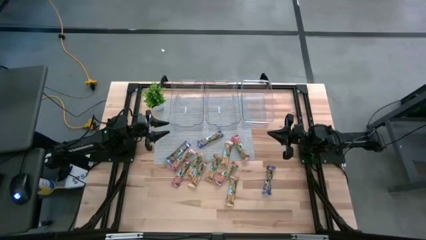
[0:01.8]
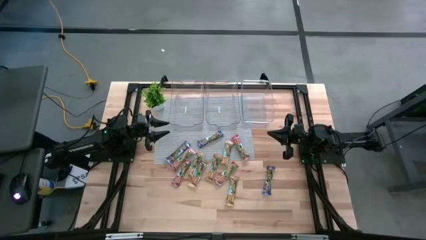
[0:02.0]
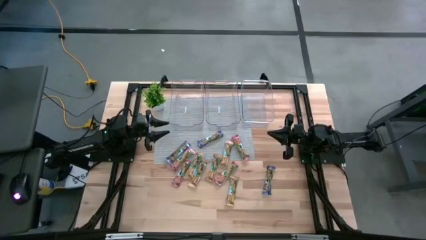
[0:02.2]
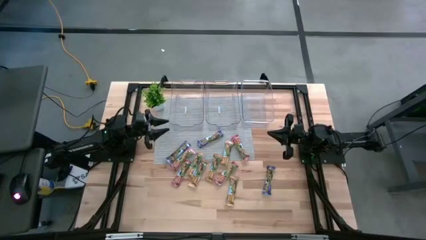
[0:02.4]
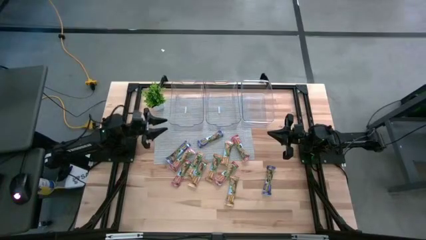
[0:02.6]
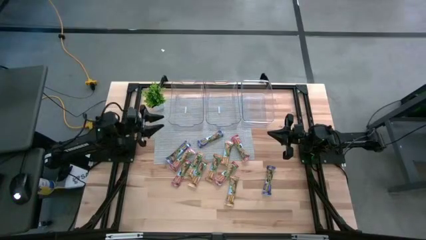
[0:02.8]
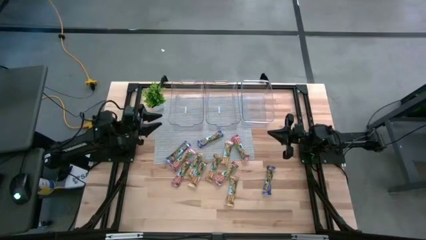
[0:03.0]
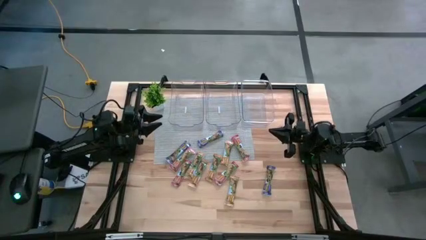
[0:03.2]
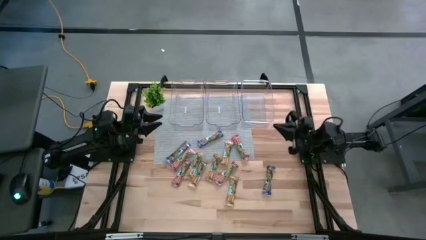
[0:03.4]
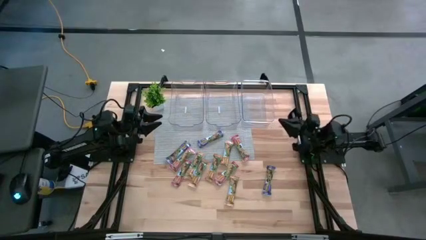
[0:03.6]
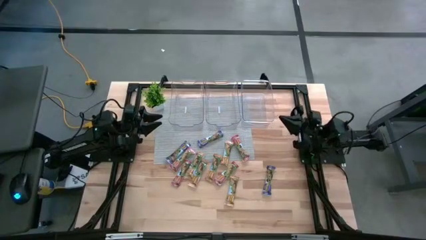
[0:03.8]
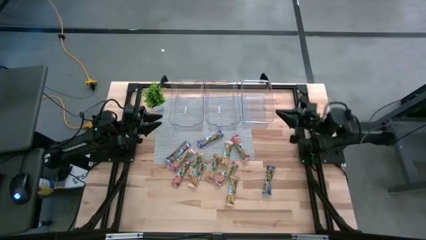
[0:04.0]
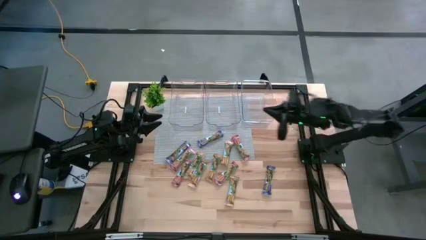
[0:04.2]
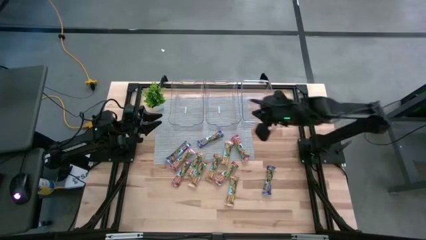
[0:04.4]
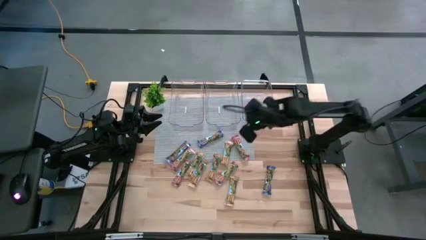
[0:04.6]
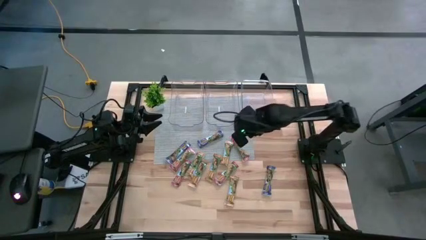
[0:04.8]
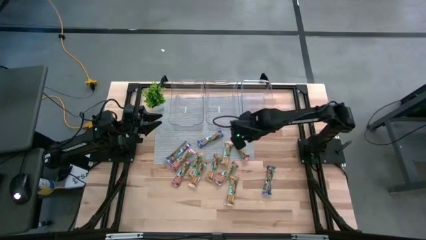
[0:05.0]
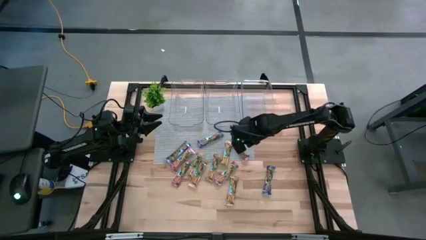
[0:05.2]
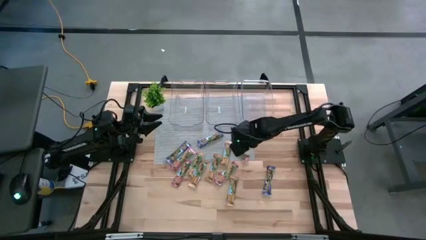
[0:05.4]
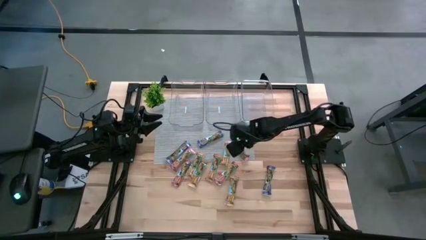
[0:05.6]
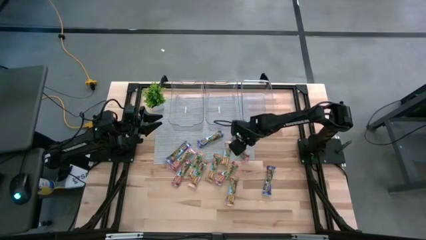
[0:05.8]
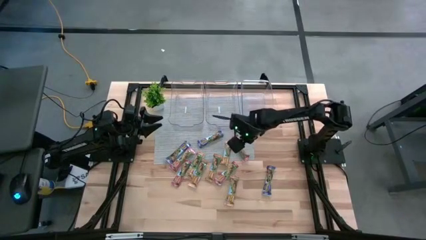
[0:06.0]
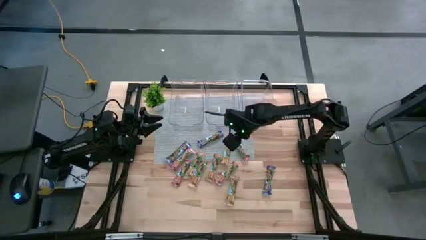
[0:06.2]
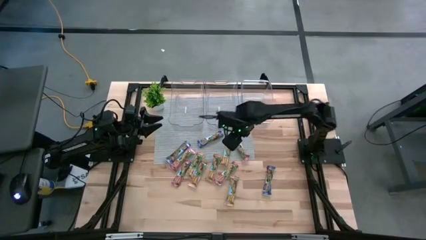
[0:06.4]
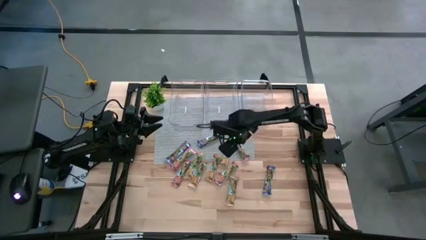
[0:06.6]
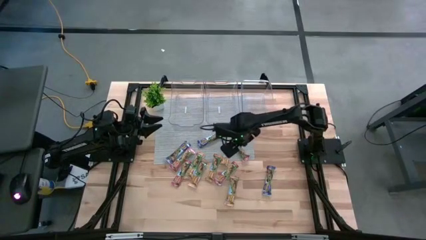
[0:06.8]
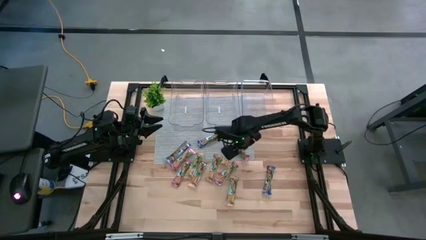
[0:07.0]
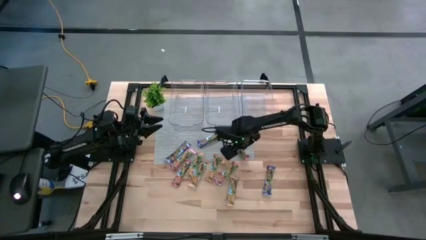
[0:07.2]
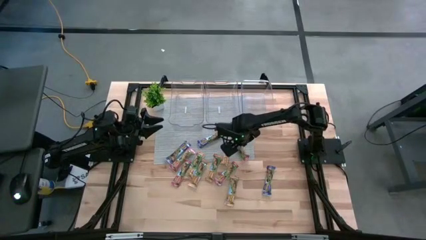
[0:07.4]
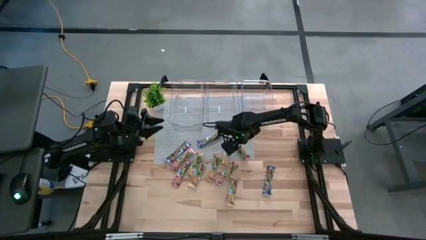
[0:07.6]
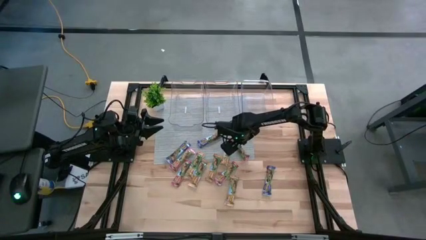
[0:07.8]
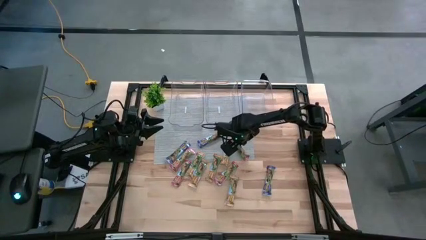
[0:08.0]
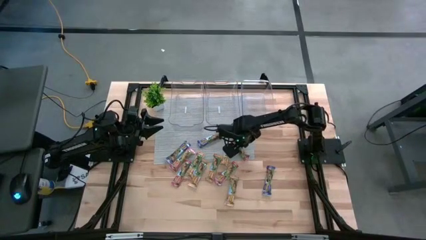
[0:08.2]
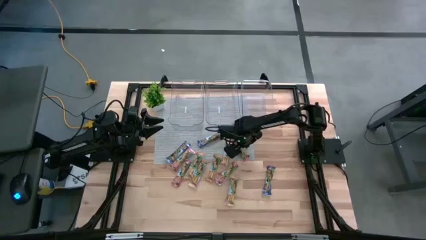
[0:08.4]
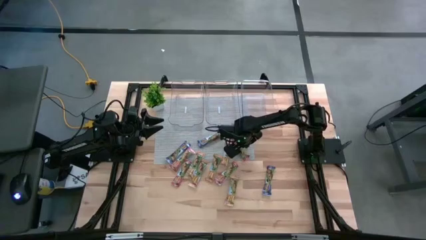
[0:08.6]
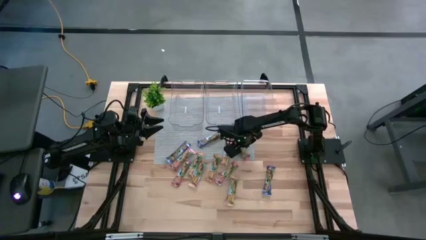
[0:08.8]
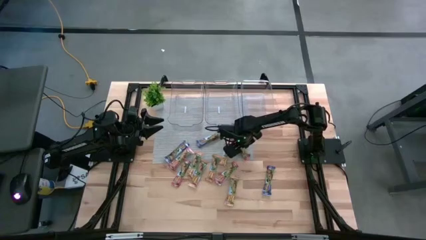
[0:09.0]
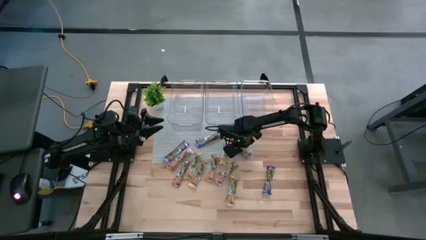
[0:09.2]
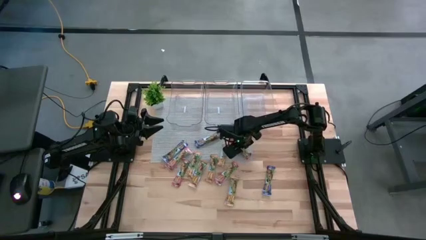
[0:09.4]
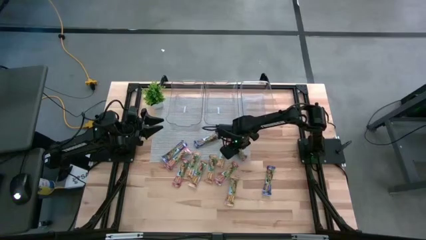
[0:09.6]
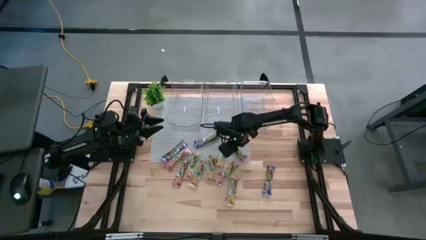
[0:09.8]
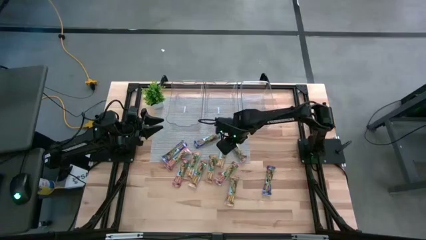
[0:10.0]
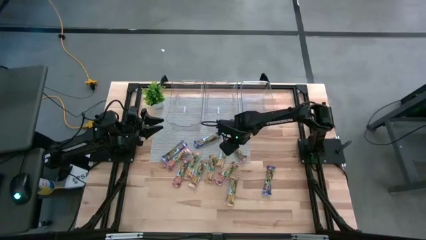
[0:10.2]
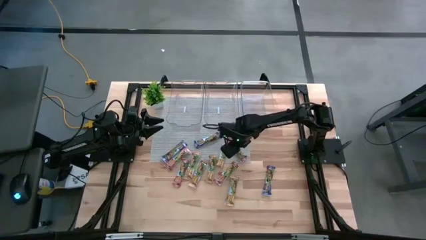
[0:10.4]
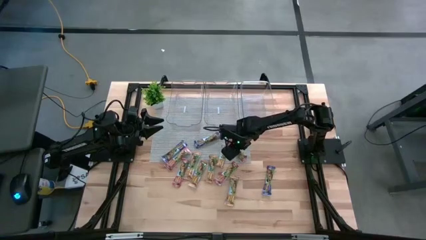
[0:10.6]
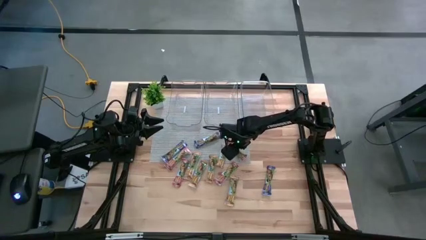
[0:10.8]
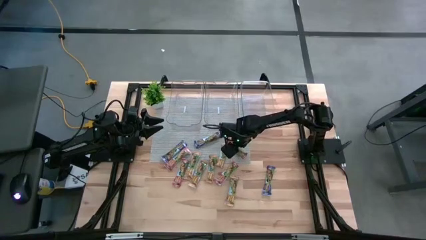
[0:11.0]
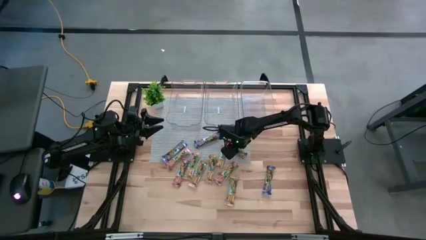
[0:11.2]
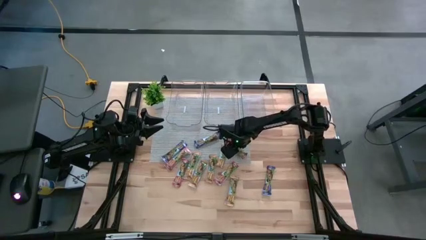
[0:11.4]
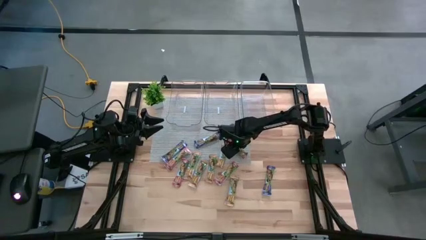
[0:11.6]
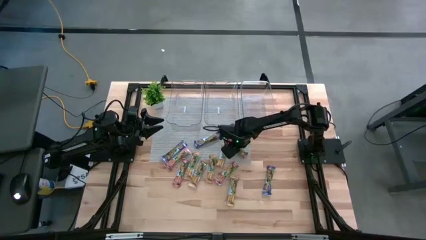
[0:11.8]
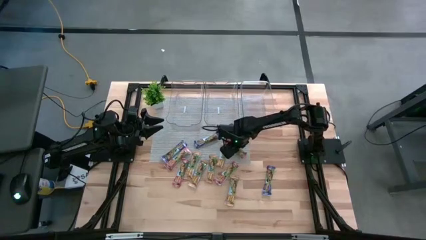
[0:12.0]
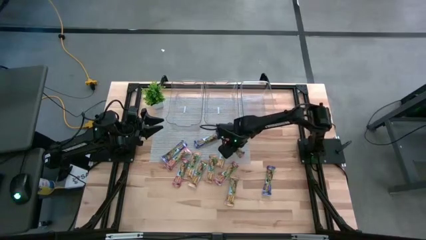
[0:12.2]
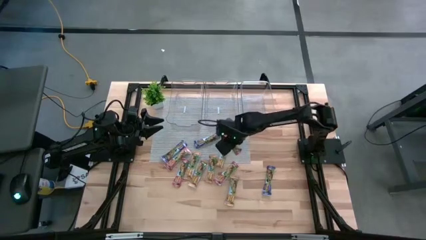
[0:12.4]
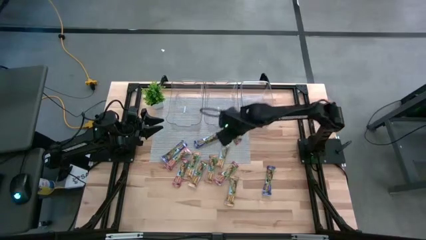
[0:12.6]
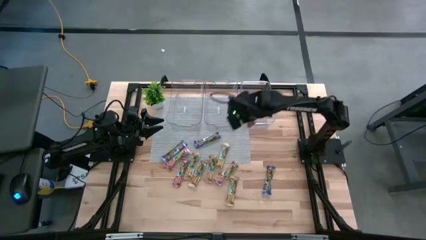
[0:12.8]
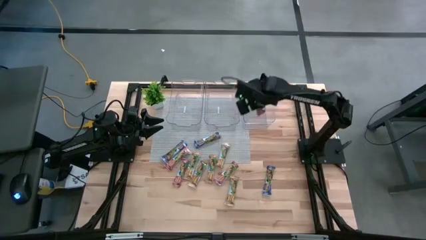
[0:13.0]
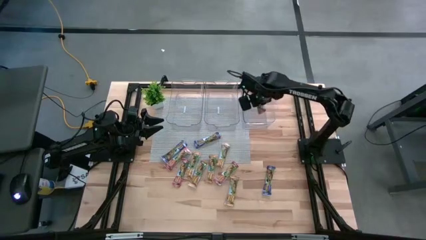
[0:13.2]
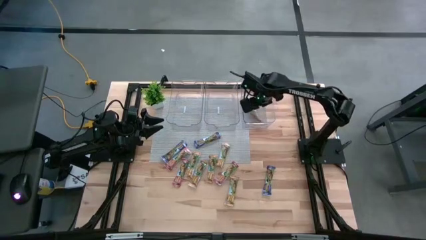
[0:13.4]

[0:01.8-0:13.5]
Task: Pick and place Granola Bars by type
Put the red granola bar into the right transparent bin

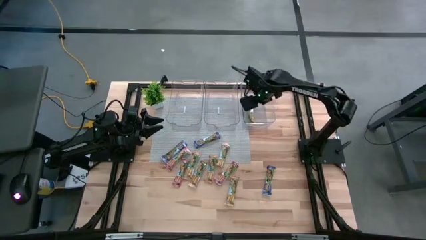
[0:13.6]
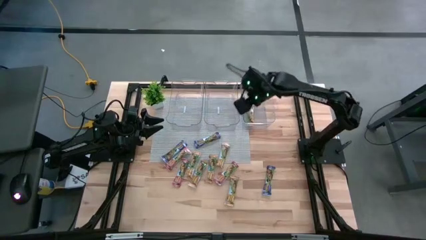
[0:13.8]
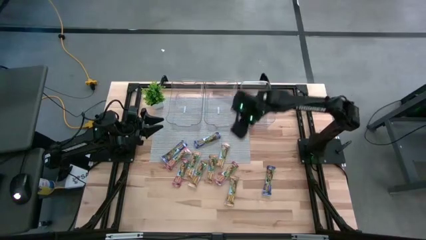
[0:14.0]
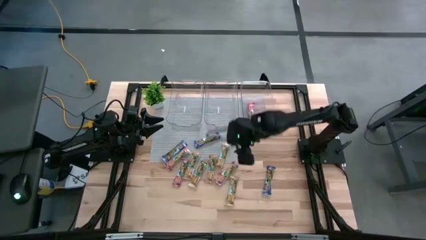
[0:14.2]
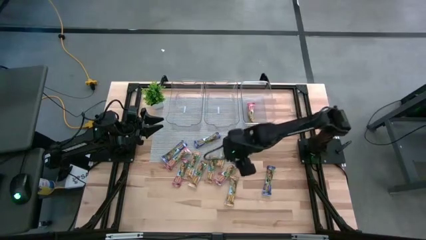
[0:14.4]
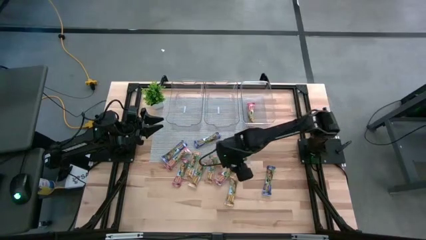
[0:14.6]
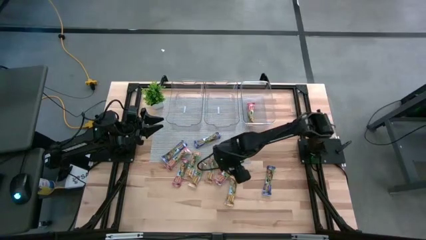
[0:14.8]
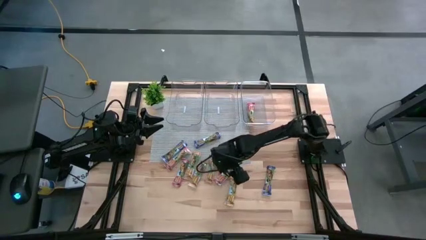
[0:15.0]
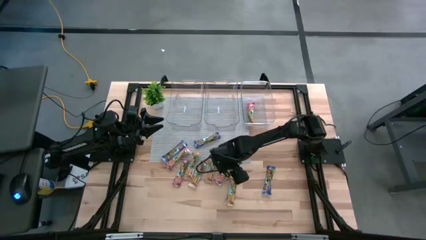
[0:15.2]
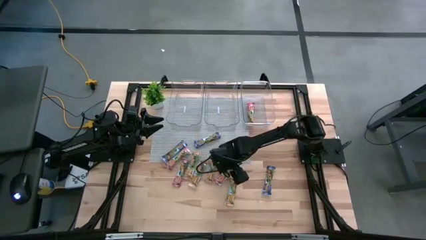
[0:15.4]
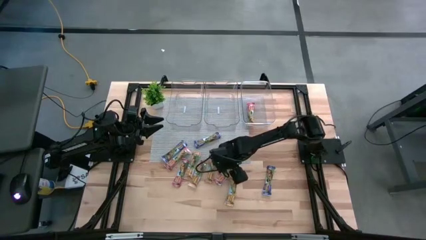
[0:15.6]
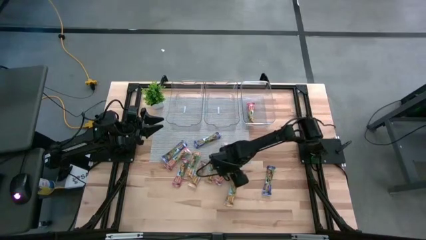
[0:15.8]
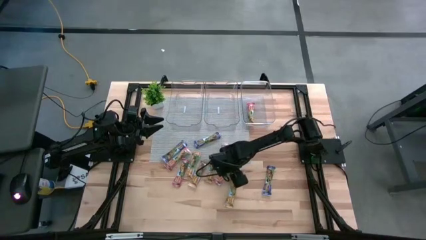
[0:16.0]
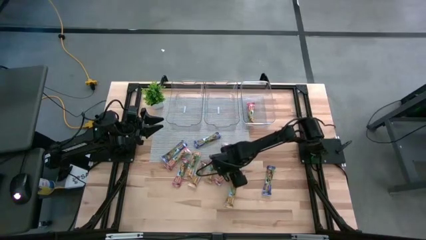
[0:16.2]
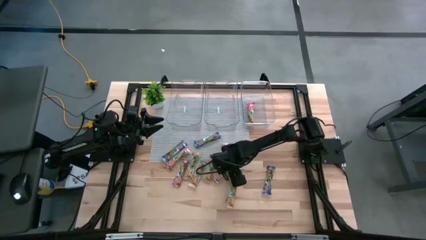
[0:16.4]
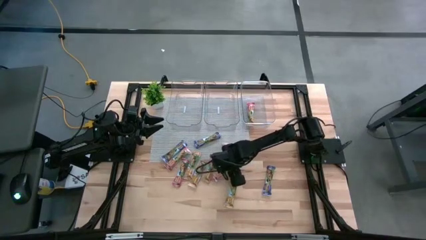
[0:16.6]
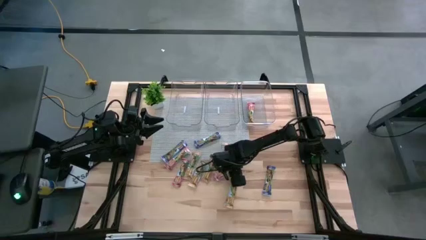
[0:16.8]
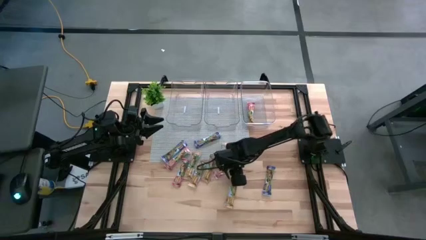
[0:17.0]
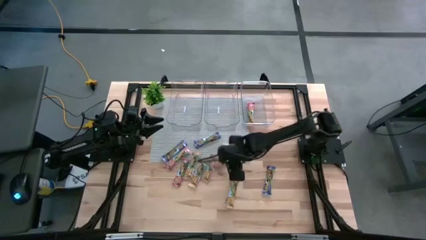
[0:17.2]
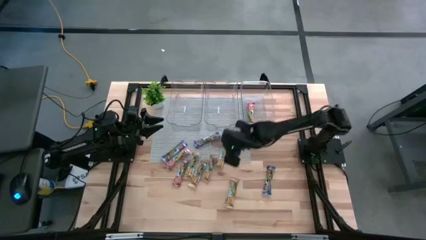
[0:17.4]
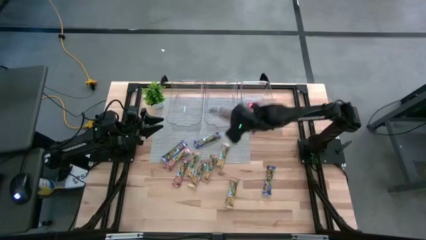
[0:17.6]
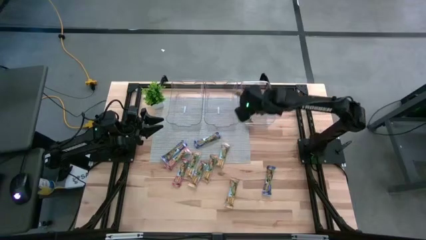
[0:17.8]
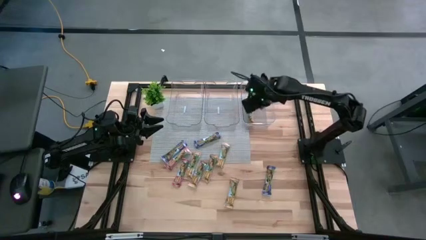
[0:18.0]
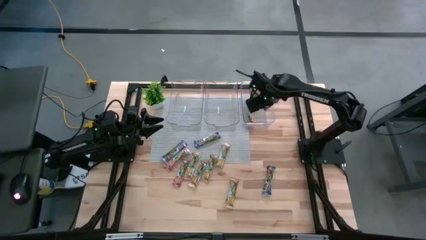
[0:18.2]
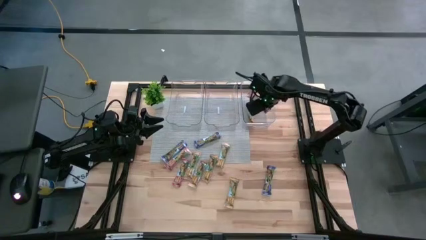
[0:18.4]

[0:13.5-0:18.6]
Put the red granola bar into the right transparent bin
